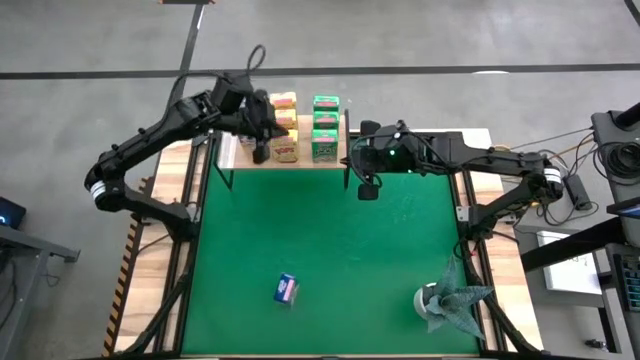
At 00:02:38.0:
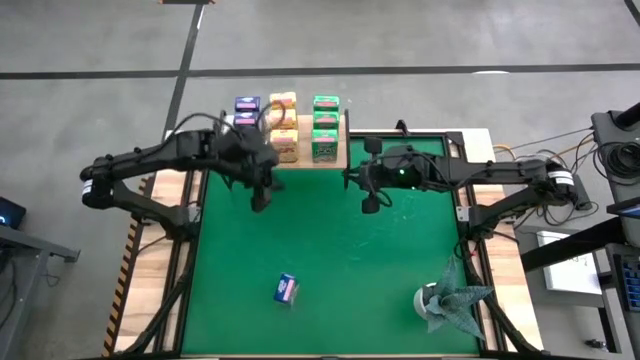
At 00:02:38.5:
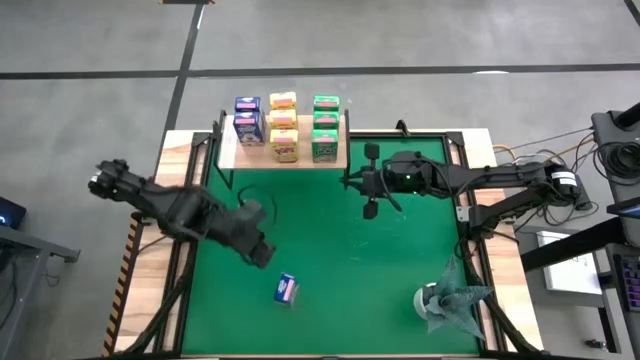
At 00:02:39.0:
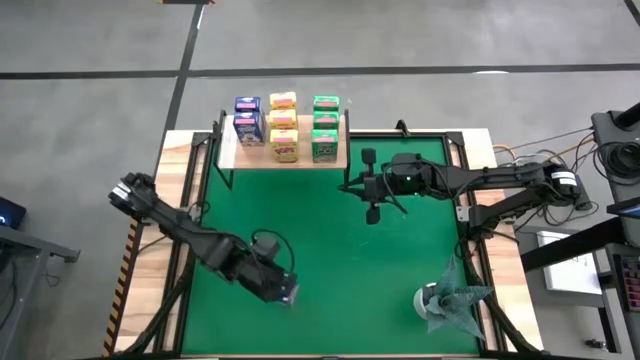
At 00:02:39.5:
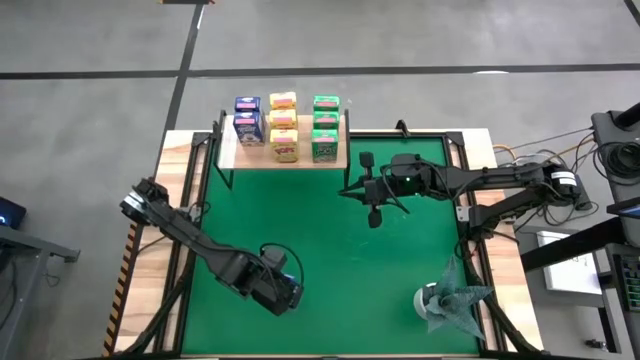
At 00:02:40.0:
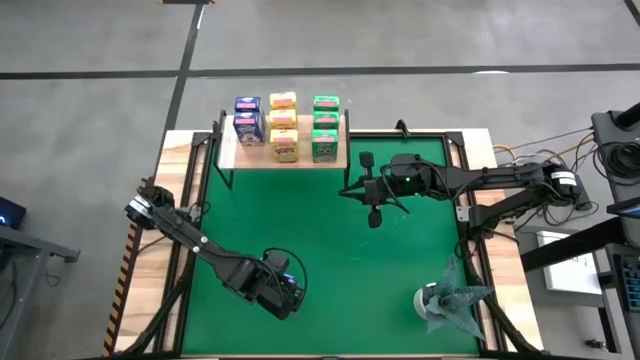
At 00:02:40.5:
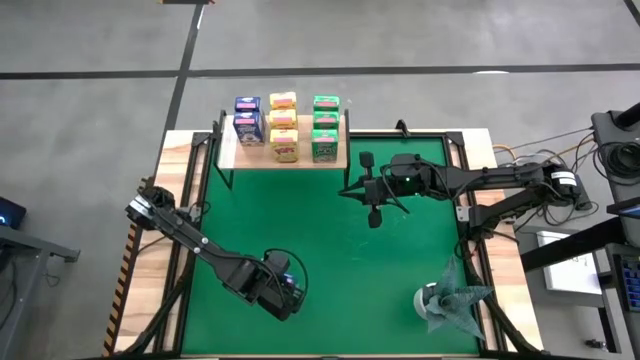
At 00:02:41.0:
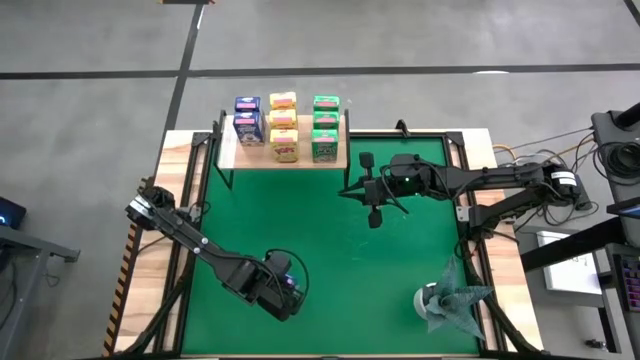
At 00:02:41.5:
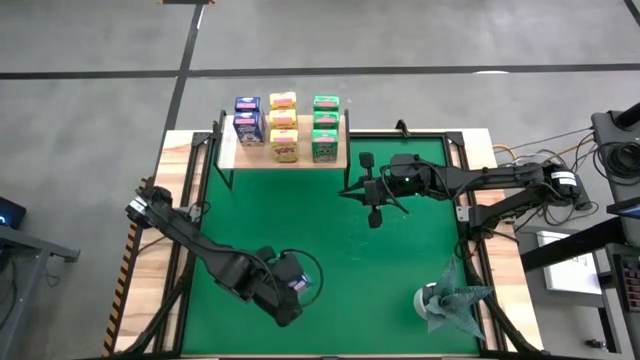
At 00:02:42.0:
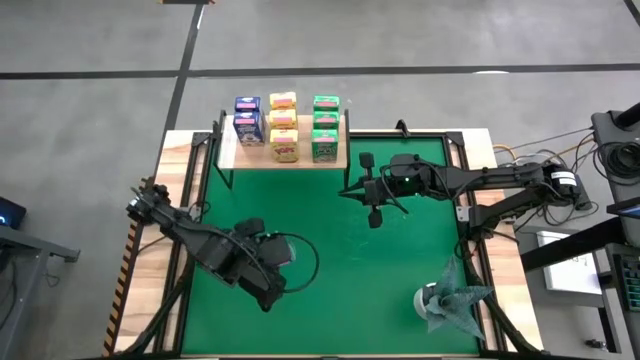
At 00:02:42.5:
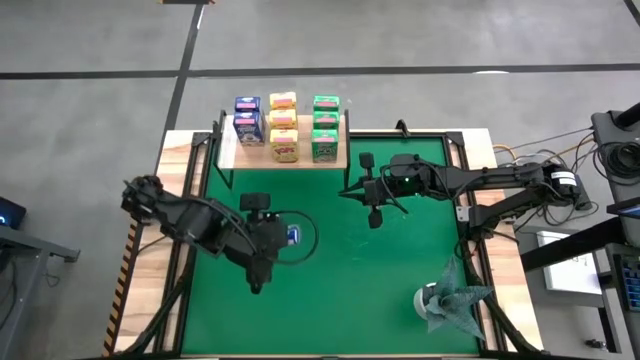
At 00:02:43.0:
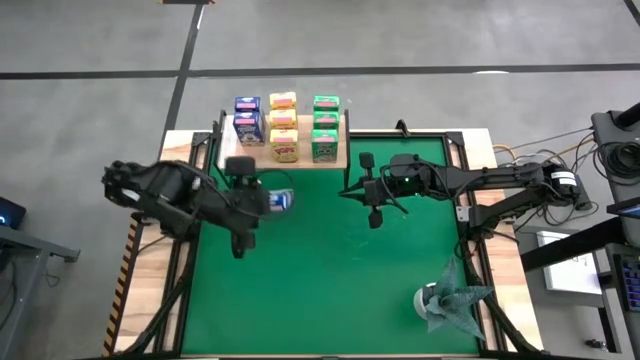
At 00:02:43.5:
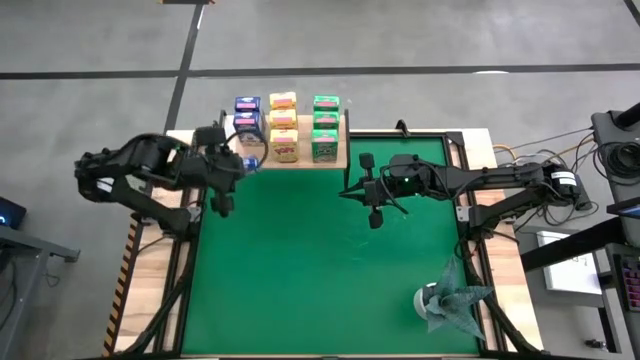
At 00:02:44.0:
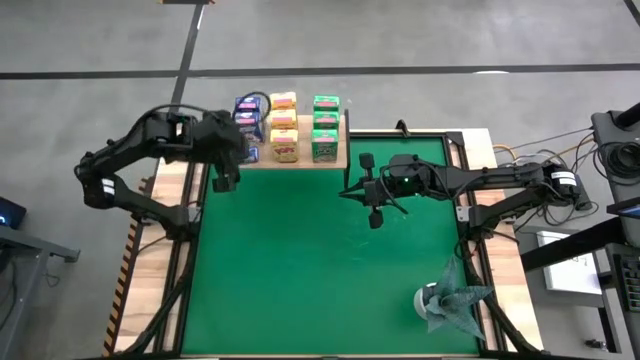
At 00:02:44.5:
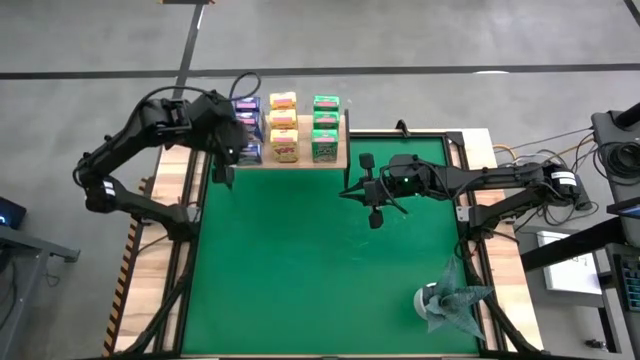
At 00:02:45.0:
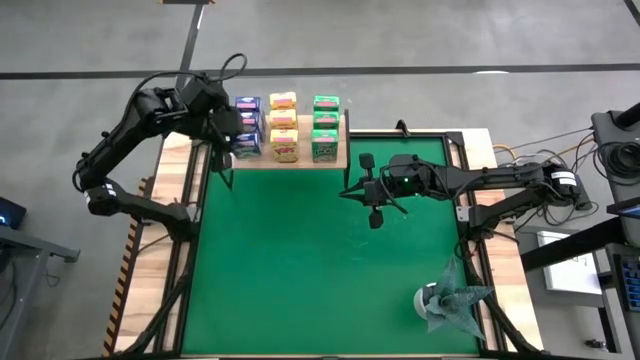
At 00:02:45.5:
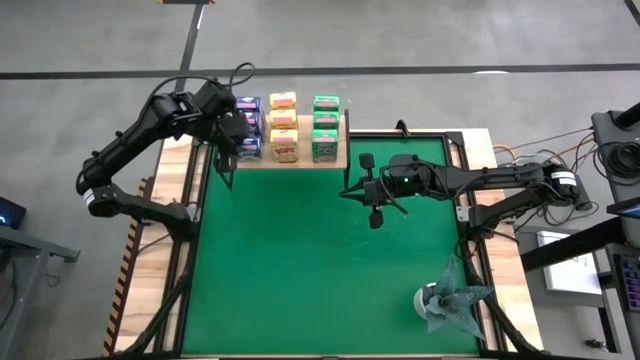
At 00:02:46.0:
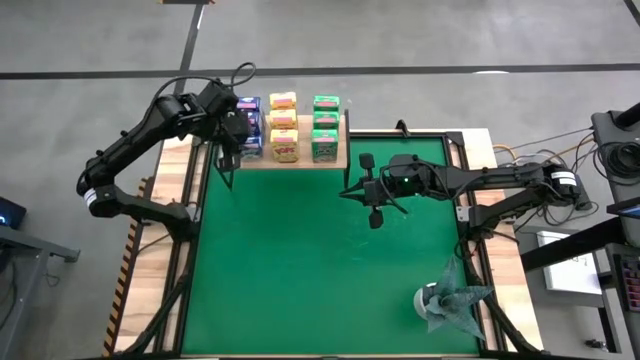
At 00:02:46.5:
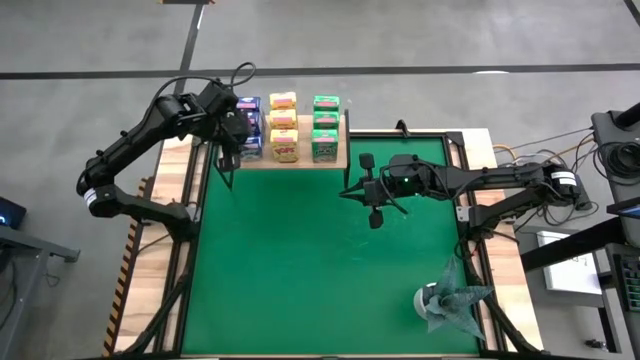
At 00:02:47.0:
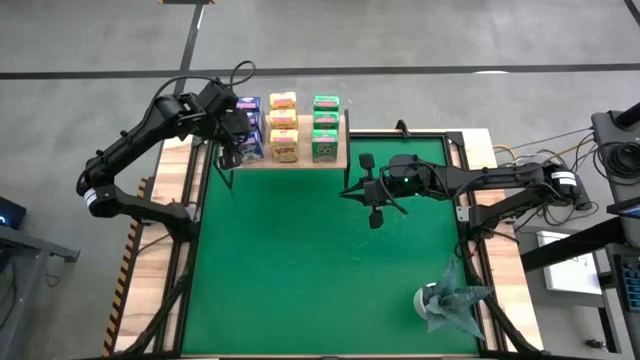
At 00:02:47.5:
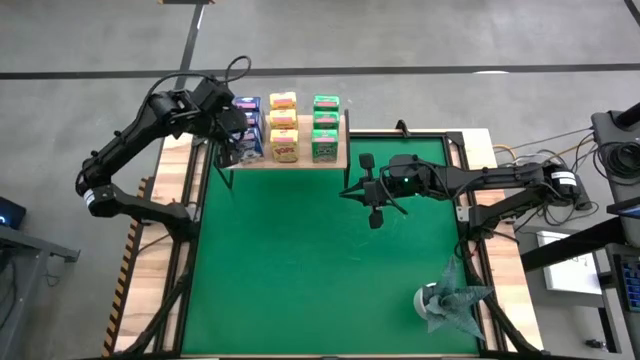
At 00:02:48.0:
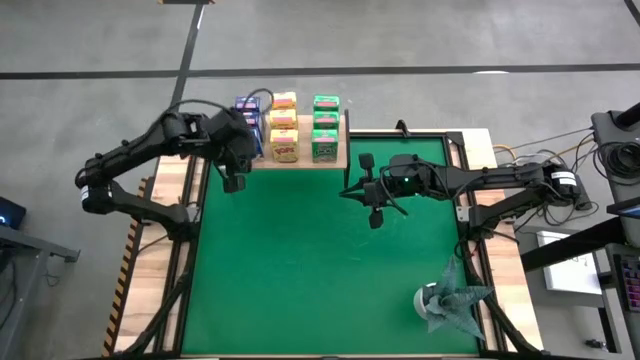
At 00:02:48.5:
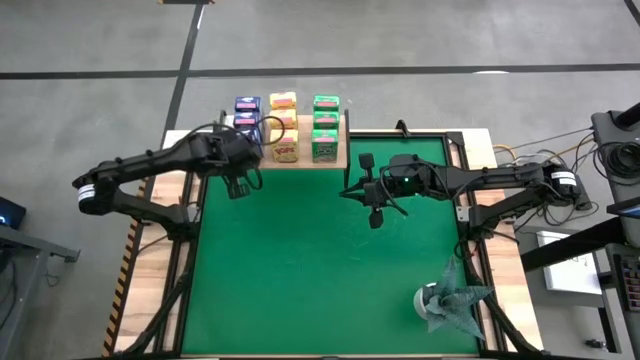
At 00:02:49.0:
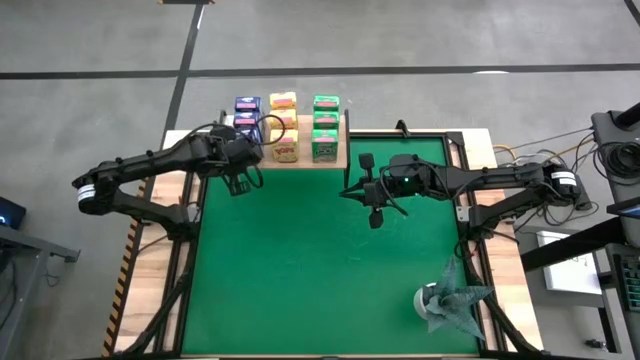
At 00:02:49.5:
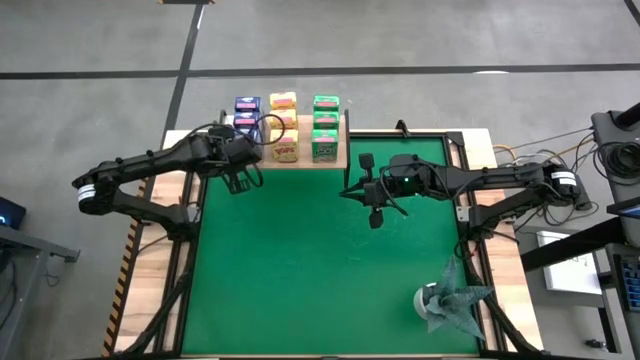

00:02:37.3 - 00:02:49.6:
Task: Stack cereal on shelf
Put the blue cereal box on the shelf aligned with the other blue cereal box

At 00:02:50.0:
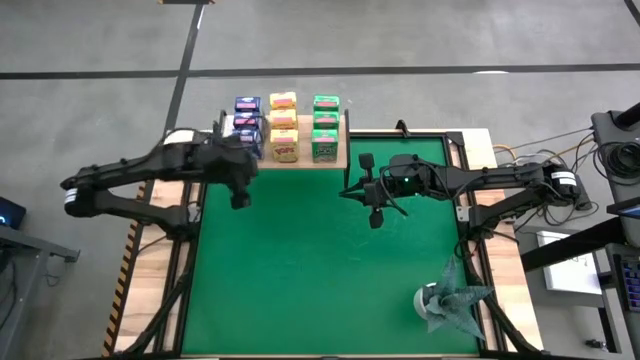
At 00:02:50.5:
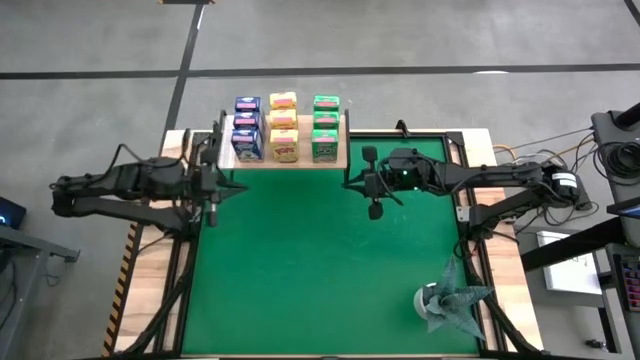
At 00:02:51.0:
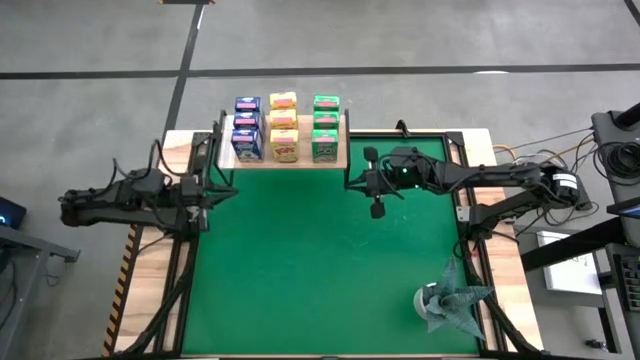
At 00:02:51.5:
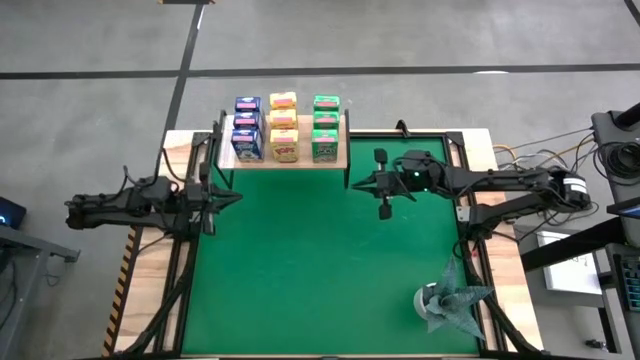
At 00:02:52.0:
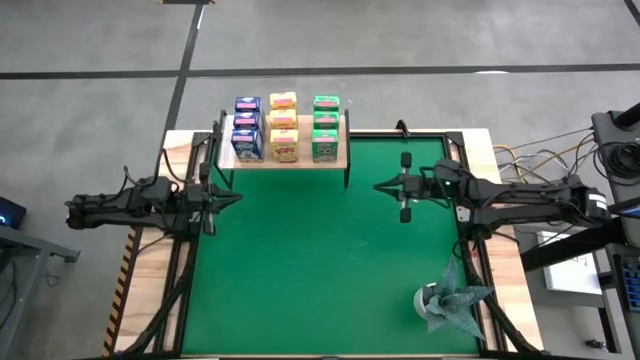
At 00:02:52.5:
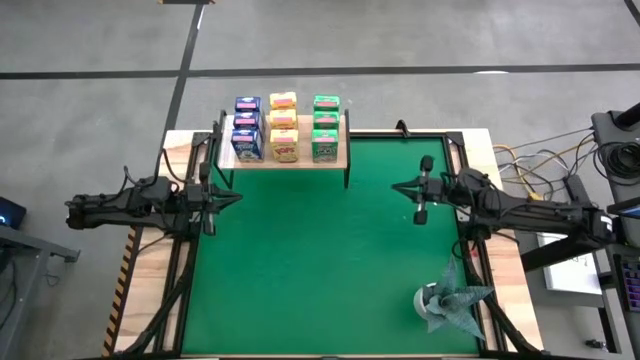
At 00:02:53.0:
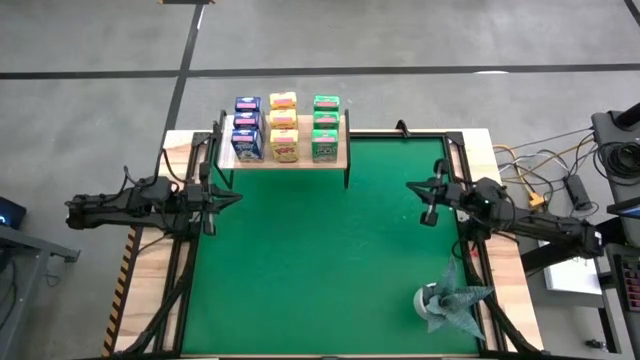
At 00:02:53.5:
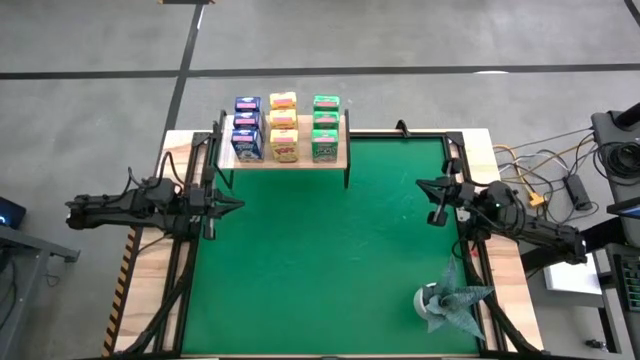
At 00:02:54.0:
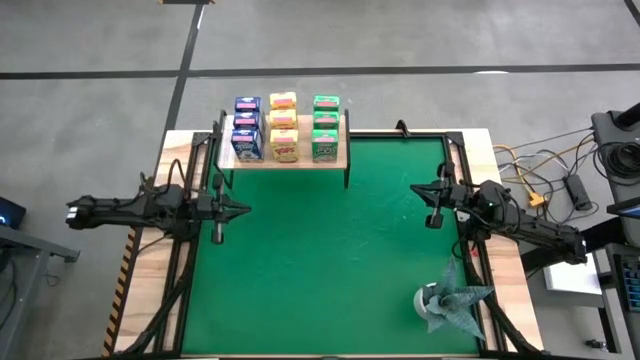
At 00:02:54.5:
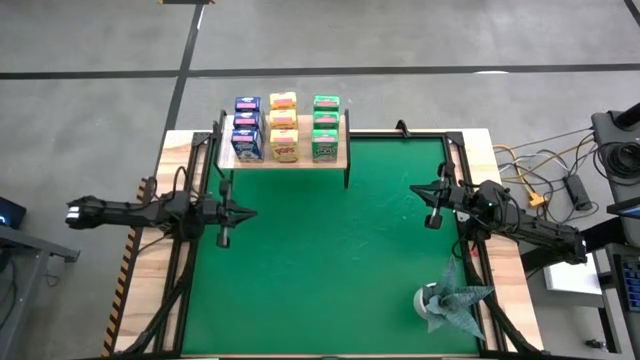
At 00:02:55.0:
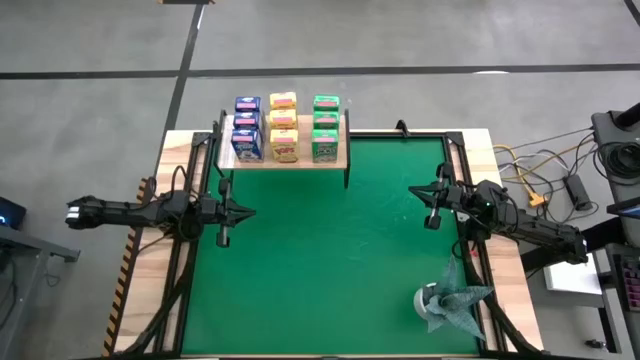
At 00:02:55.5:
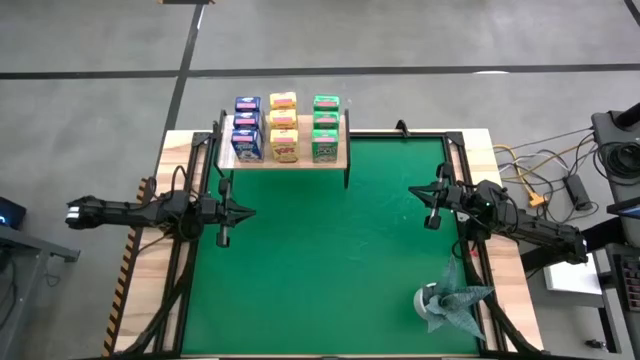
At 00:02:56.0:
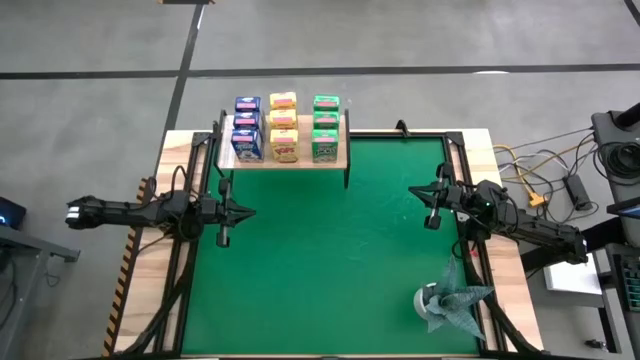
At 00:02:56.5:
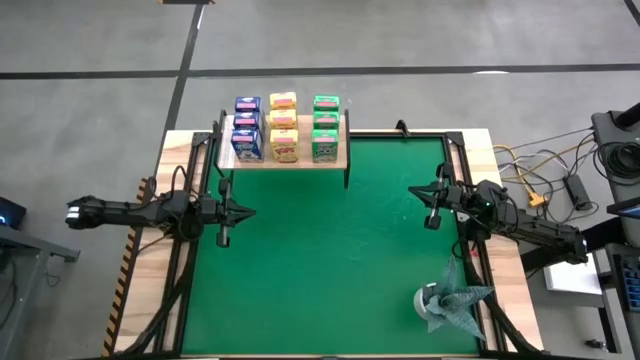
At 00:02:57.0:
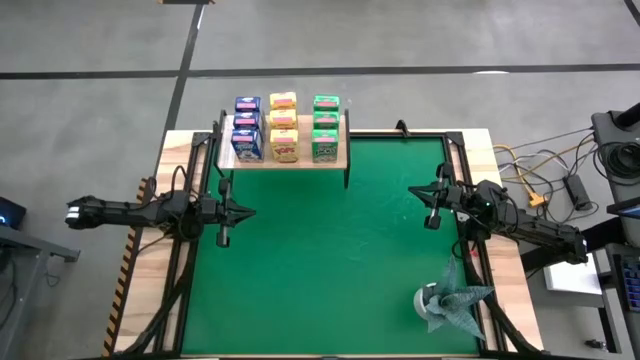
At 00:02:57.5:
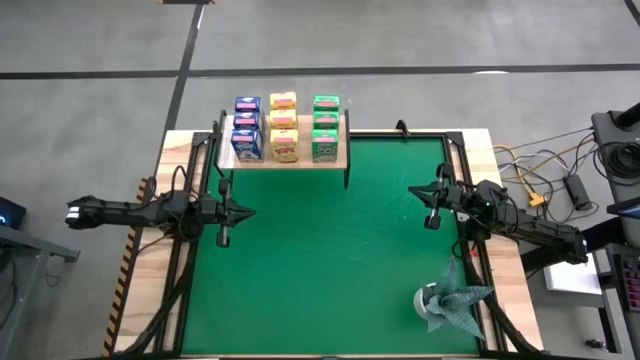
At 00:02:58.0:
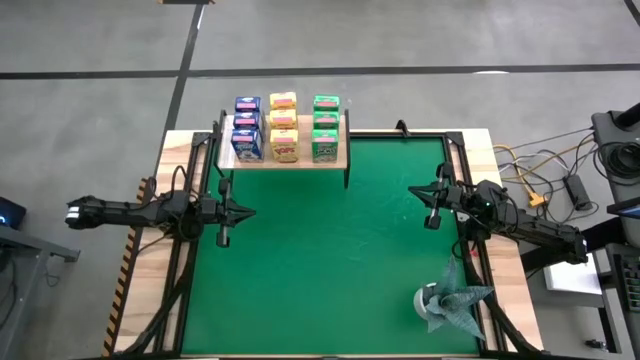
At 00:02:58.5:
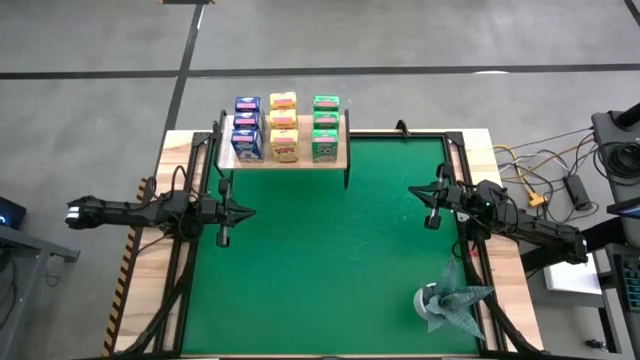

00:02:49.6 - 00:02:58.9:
Return to Home Position
